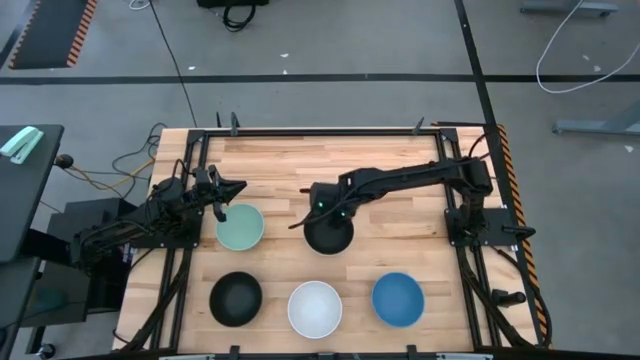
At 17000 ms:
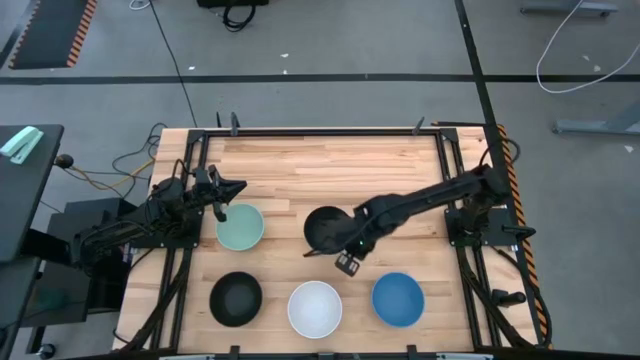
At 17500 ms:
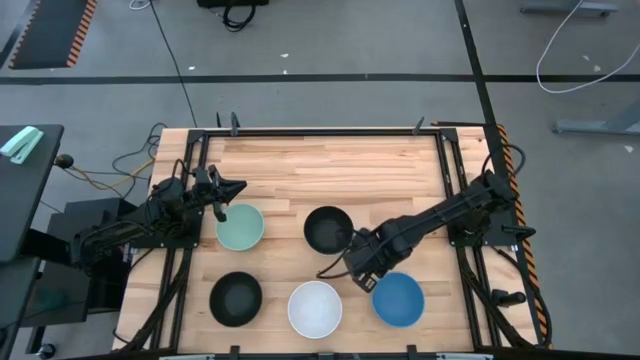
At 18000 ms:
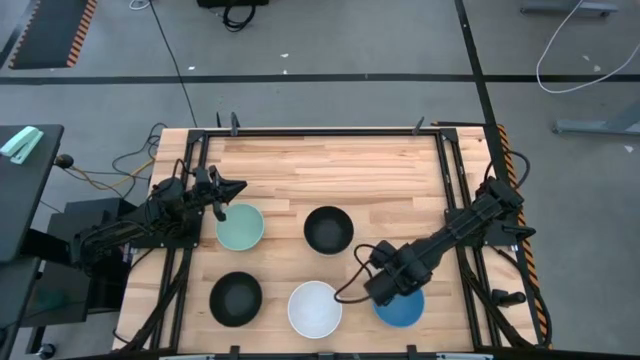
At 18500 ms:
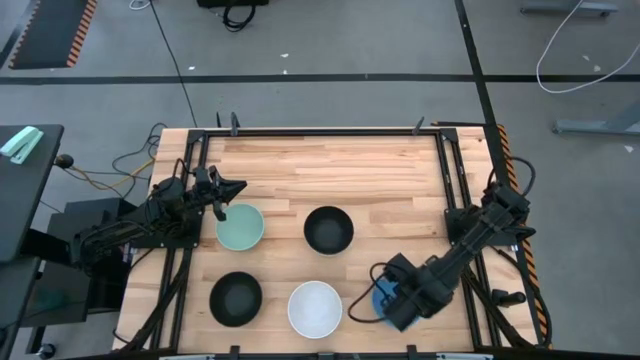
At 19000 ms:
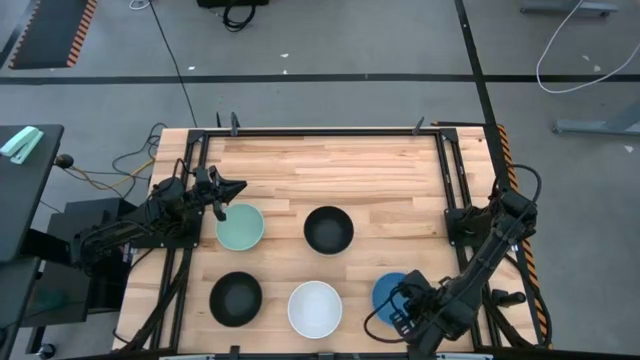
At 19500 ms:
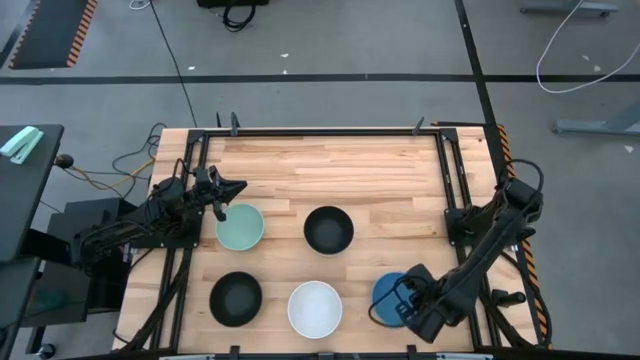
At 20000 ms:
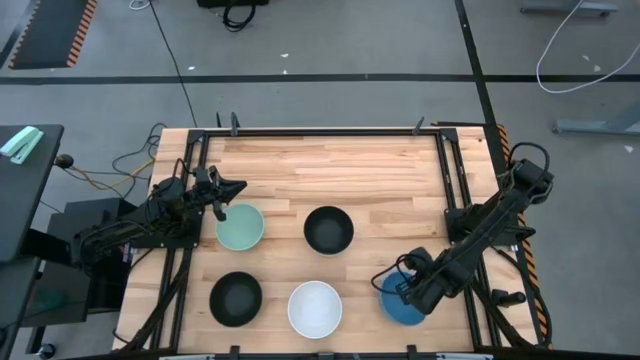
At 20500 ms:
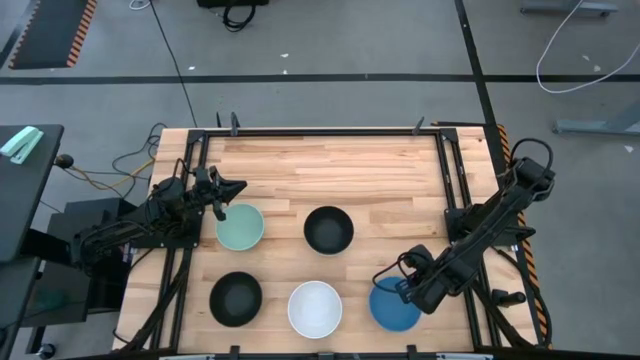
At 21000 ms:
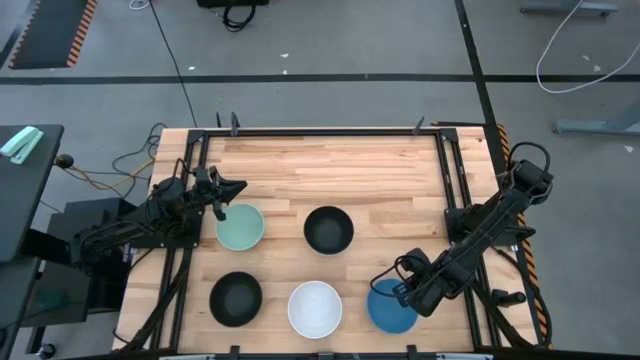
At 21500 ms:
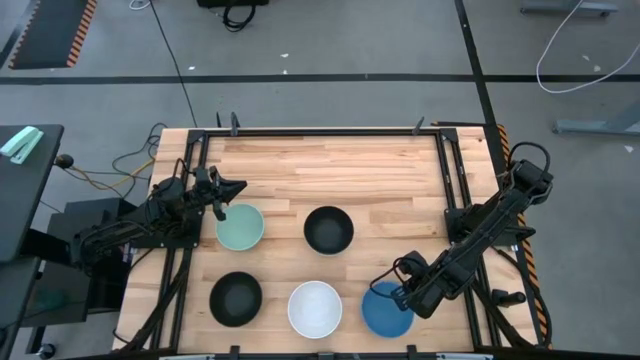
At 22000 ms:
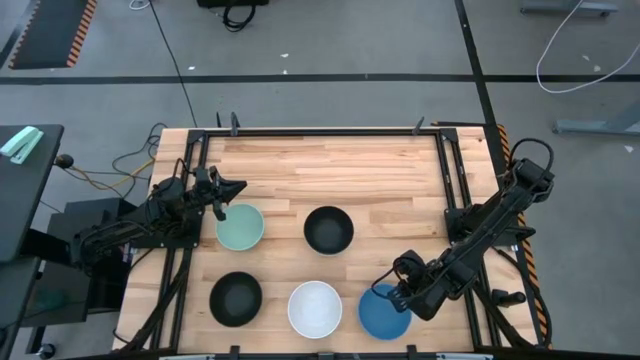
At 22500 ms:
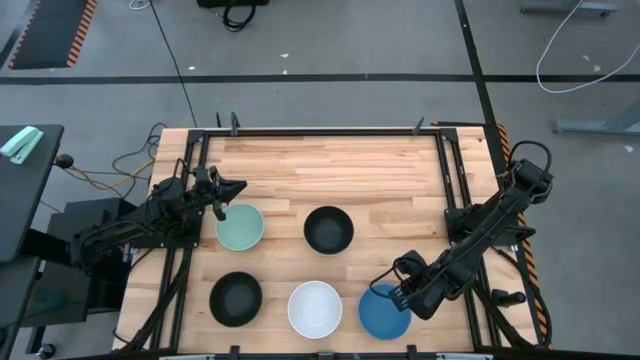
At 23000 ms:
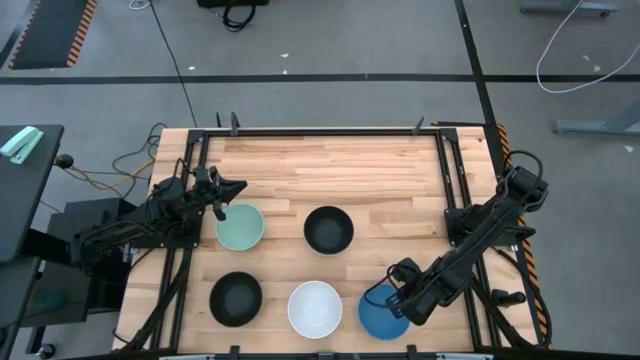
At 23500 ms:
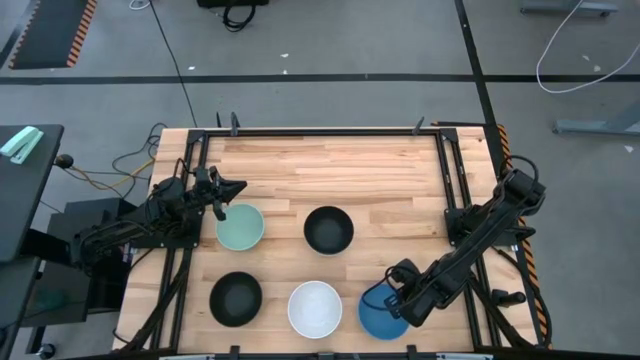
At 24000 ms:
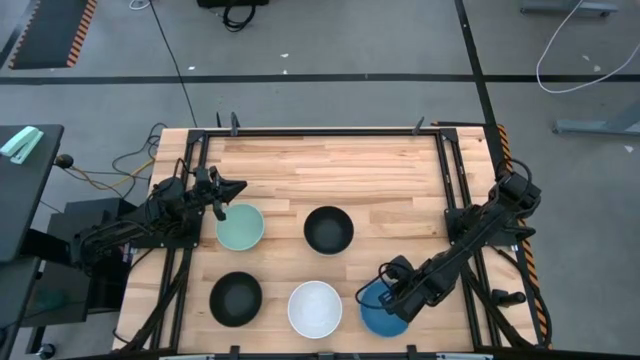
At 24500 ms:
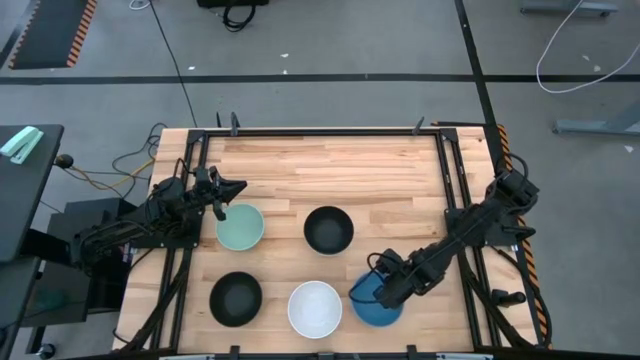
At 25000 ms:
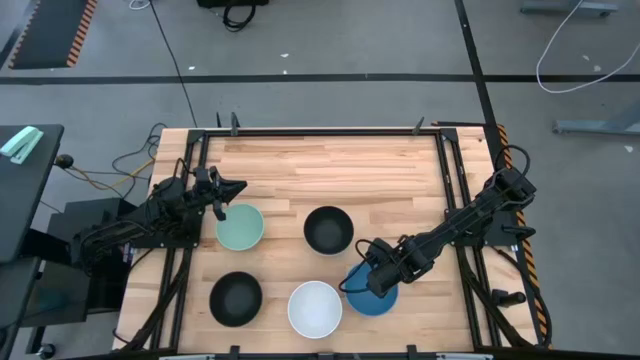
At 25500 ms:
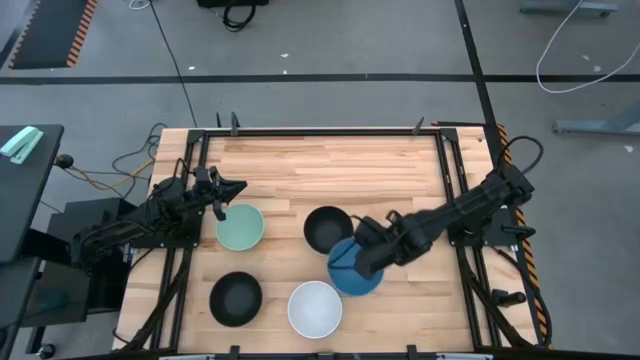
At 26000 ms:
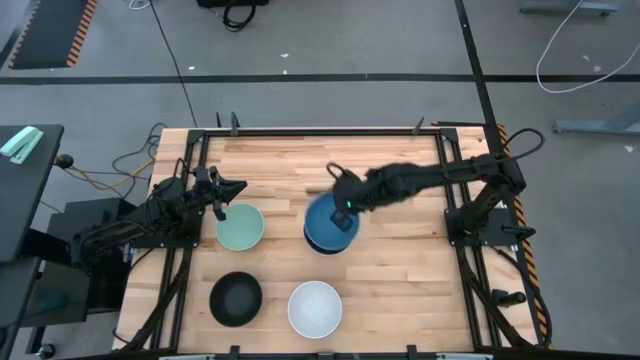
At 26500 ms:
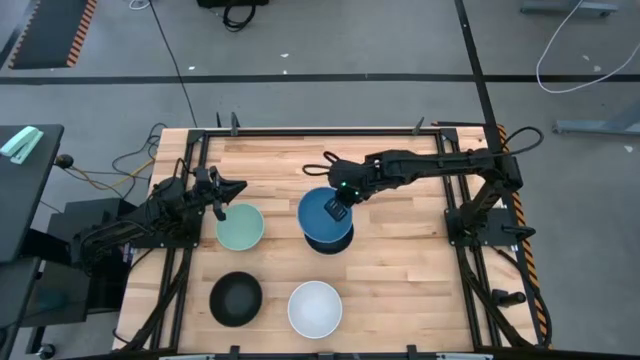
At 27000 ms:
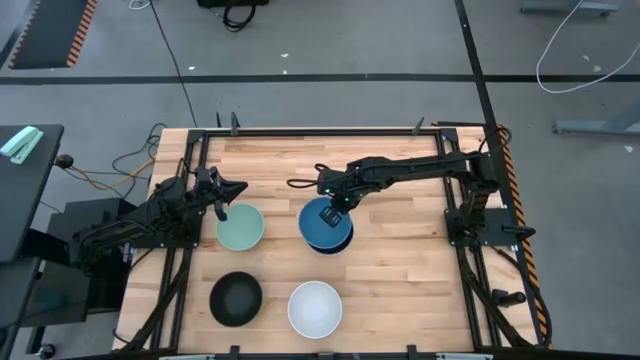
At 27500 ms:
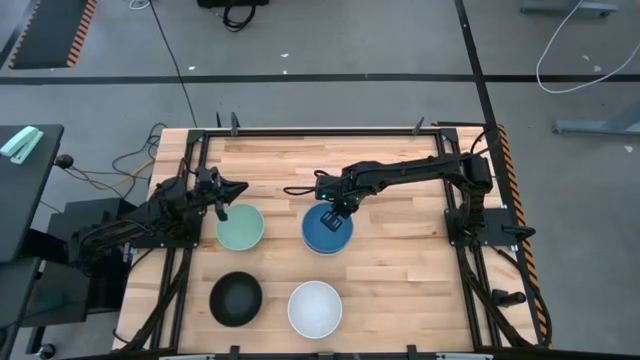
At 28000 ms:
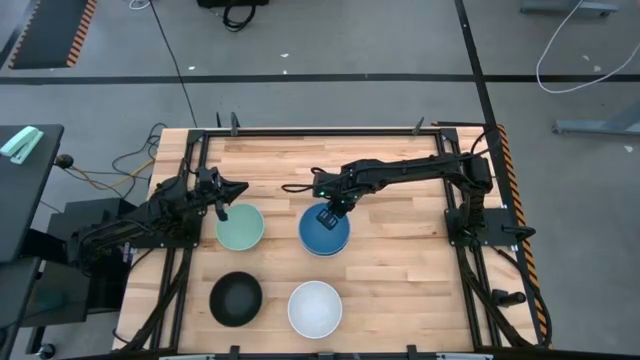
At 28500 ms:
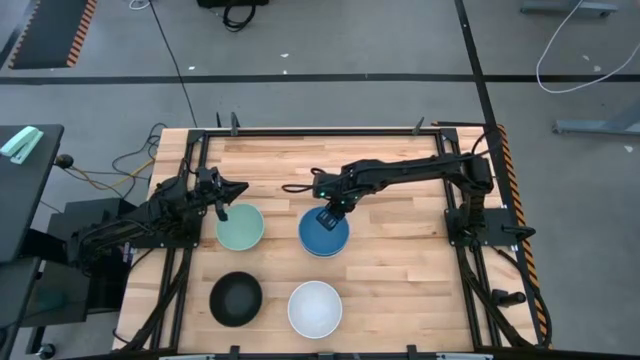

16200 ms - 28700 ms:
Task: Nest bowls inside each other
Stack the blue bowl on top of the right black bowl

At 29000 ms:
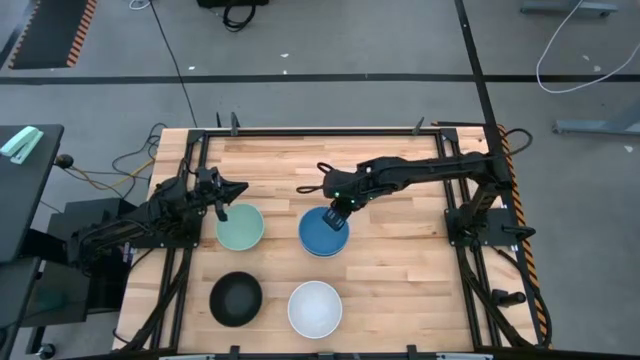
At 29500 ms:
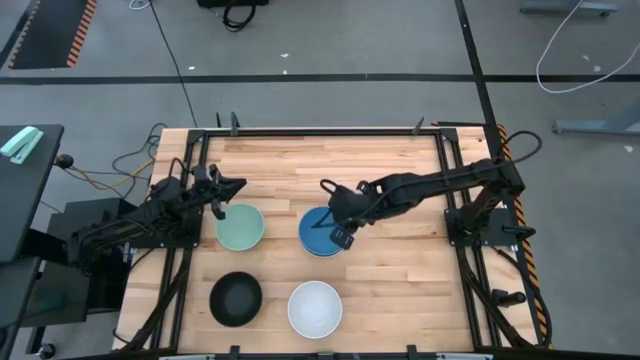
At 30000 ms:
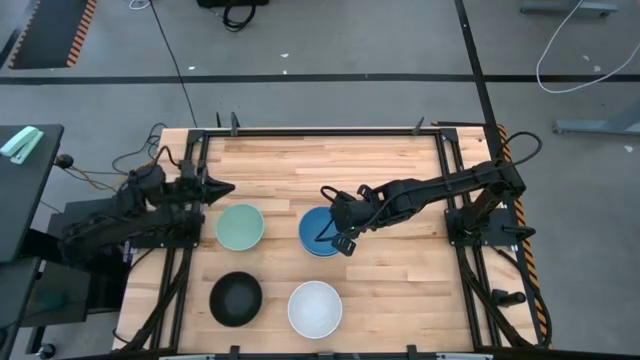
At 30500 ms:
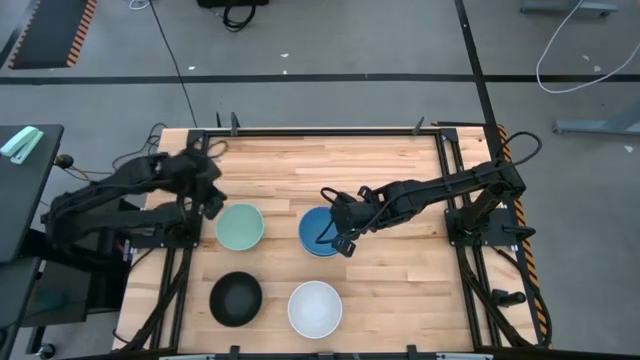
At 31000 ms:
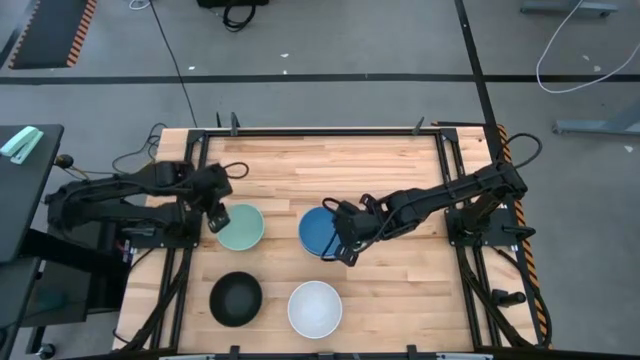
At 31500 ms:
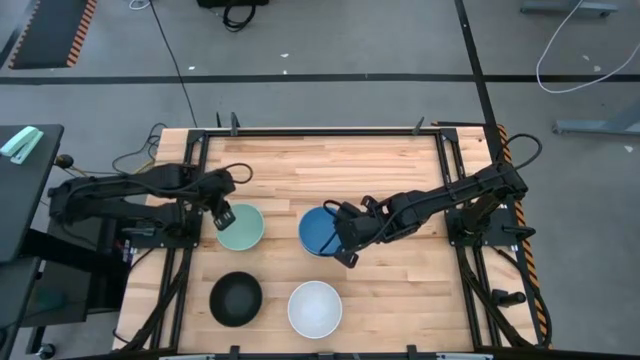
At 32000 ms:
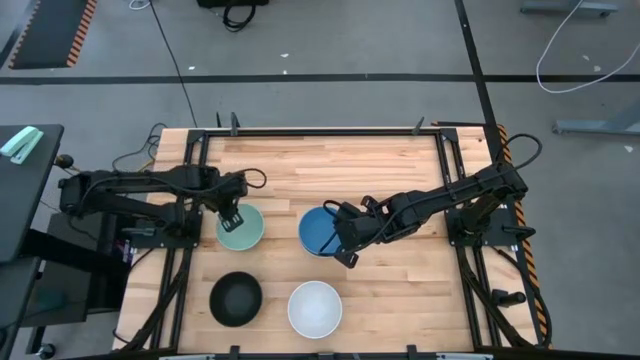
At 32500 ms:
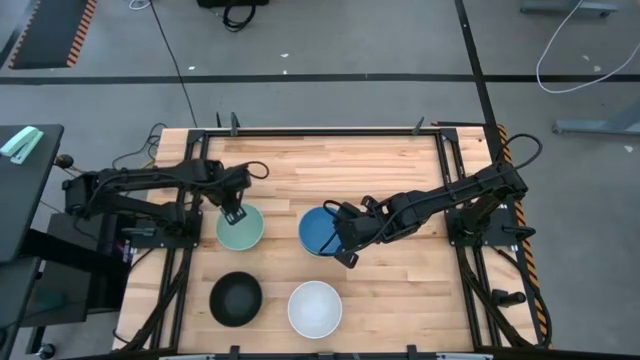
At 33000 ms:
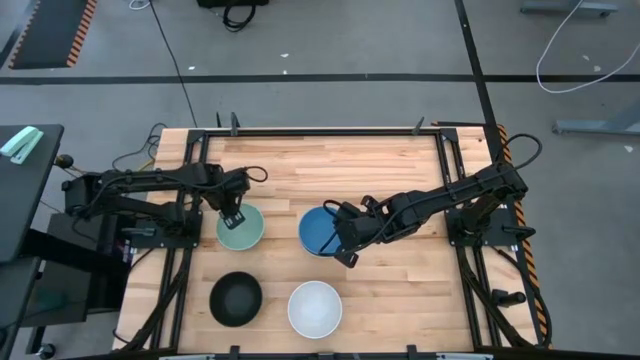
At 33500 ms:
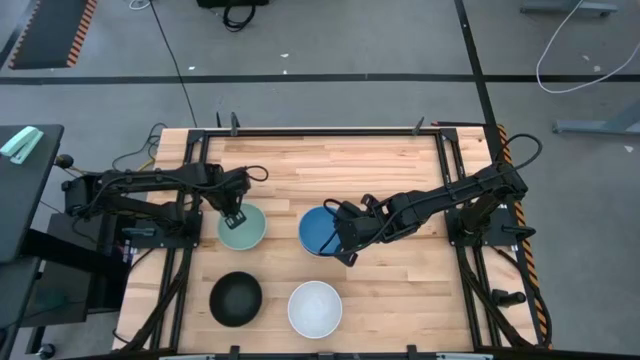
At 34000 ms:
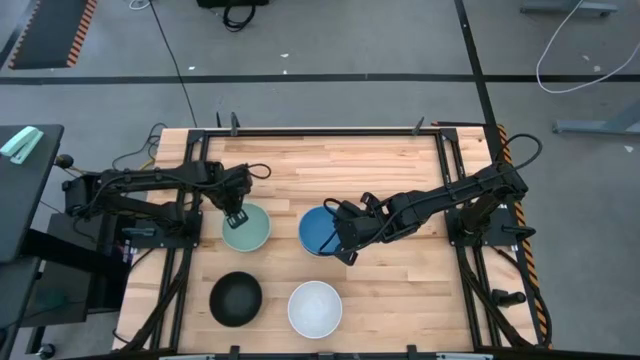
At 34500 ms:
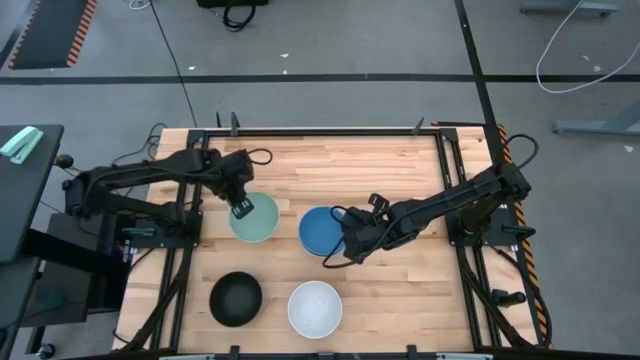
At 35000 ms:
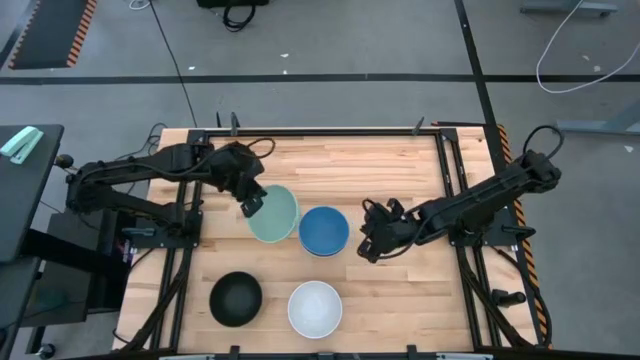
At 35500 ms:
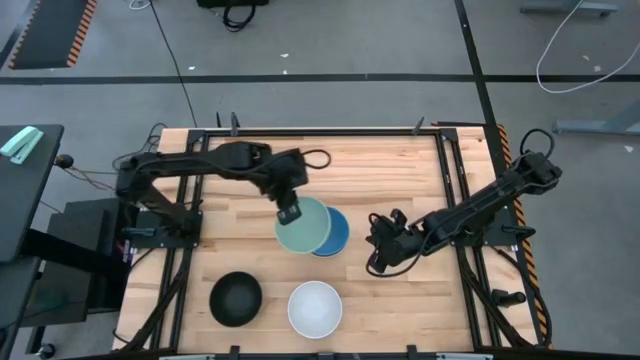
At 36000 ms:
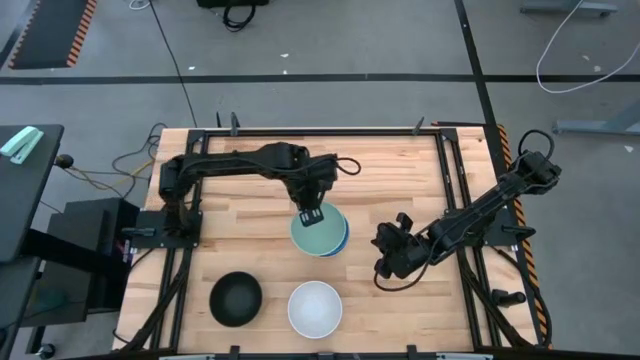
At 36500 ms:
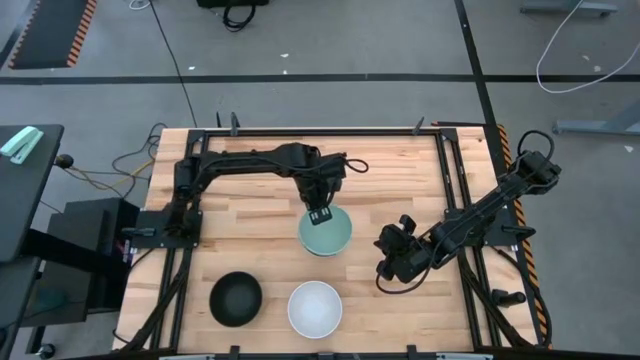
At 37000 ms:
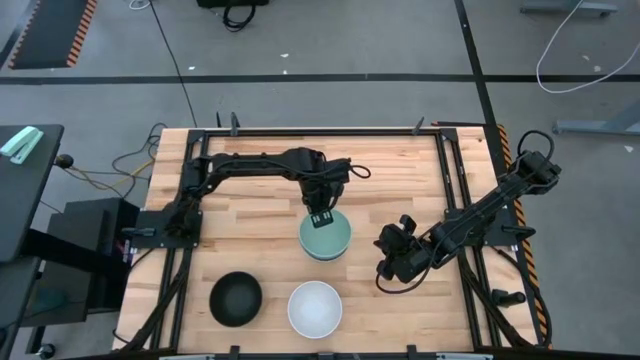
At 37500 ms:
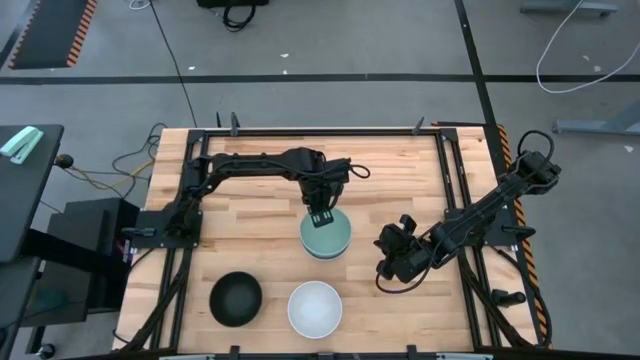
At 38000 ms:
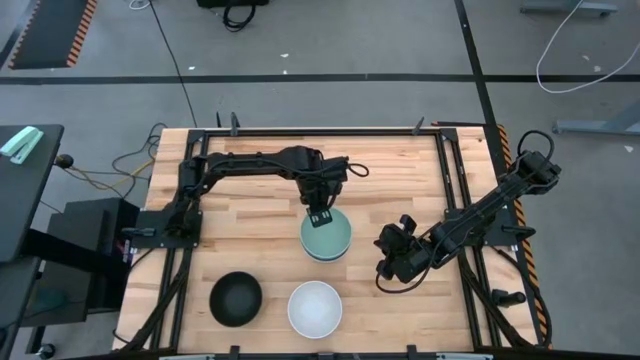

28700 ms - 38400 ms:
Stack the light green bowl on top of the blue bowl
